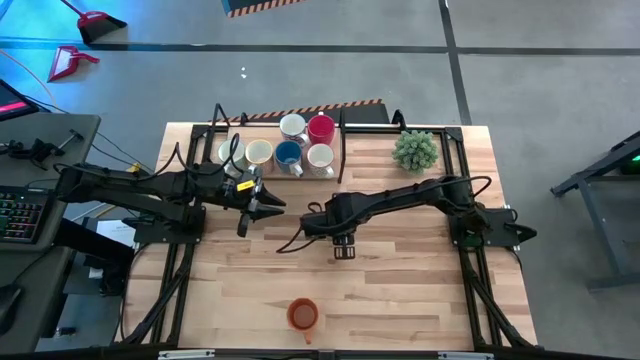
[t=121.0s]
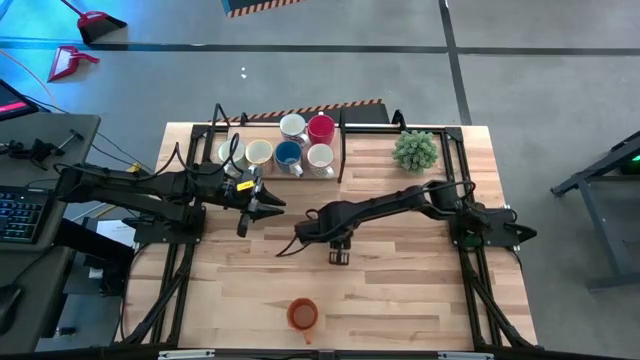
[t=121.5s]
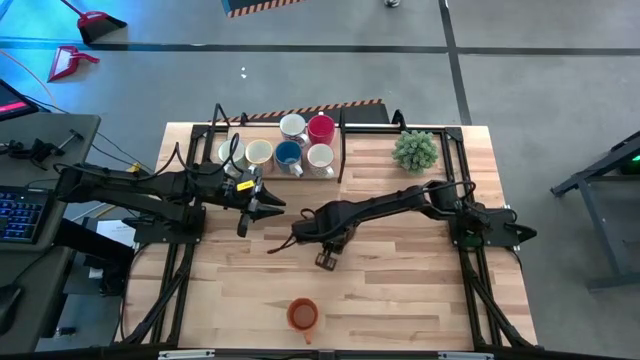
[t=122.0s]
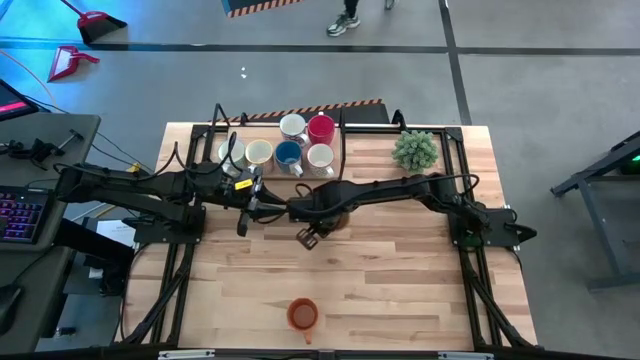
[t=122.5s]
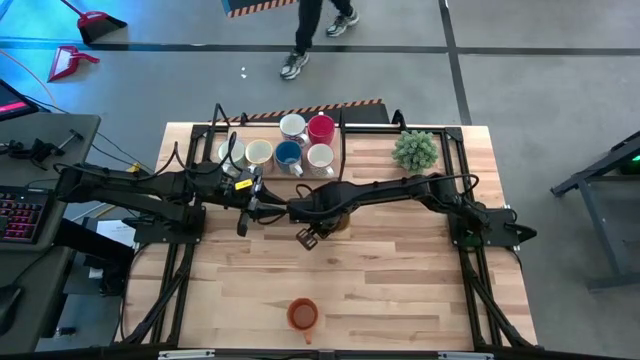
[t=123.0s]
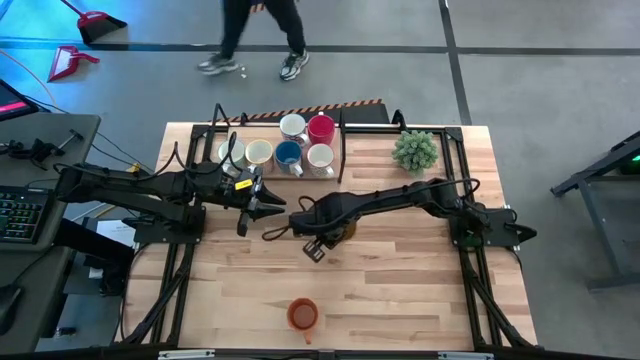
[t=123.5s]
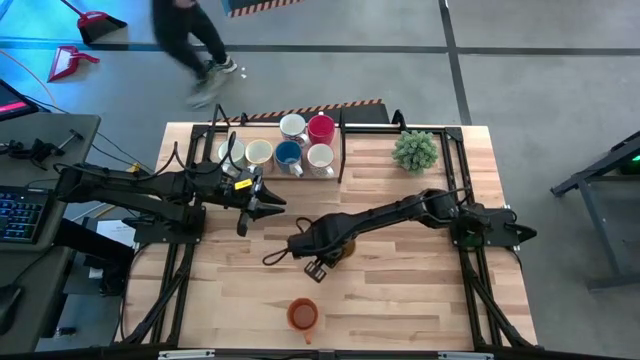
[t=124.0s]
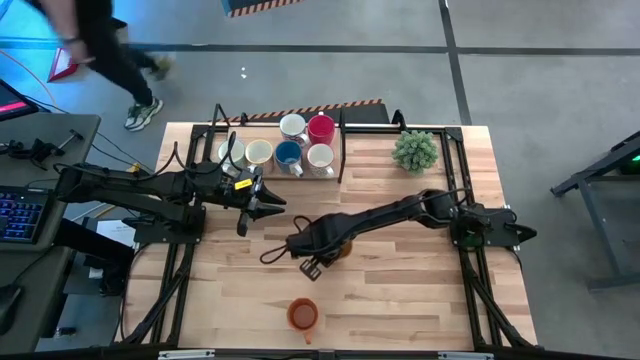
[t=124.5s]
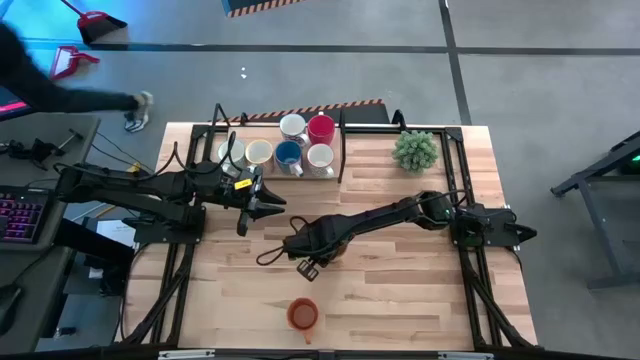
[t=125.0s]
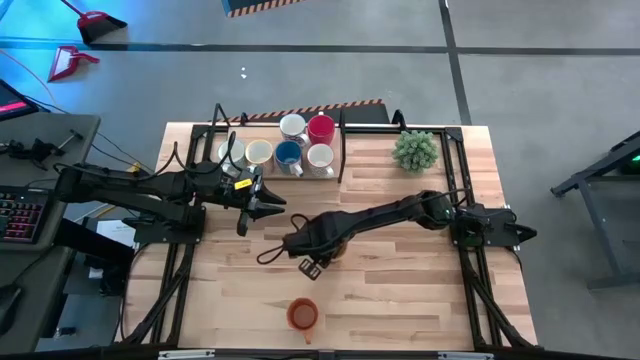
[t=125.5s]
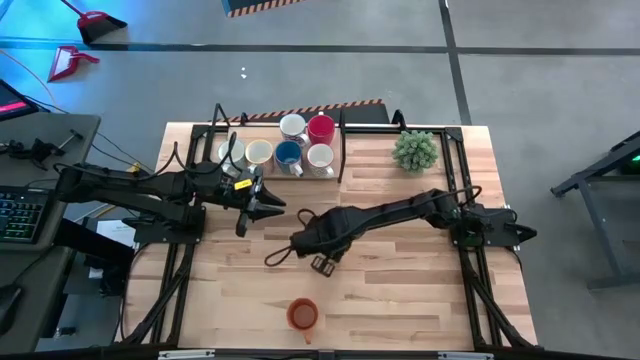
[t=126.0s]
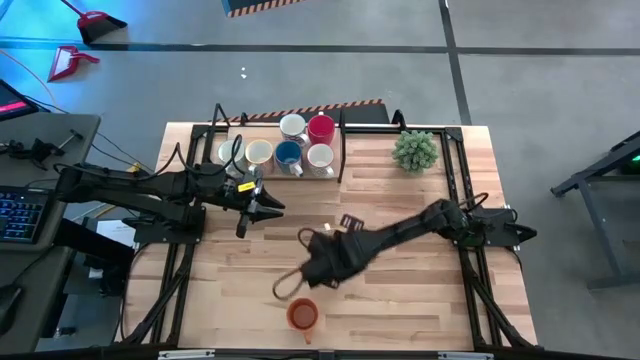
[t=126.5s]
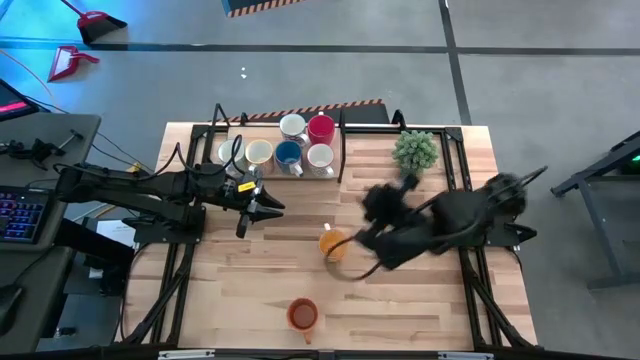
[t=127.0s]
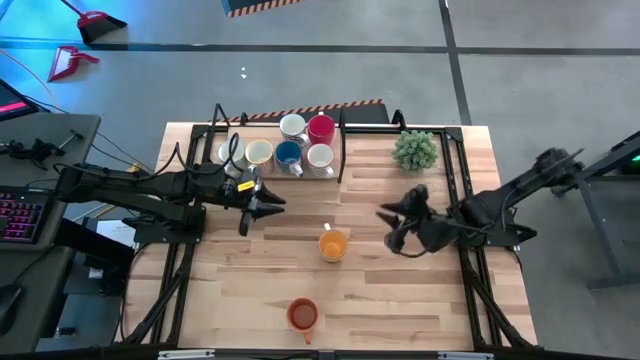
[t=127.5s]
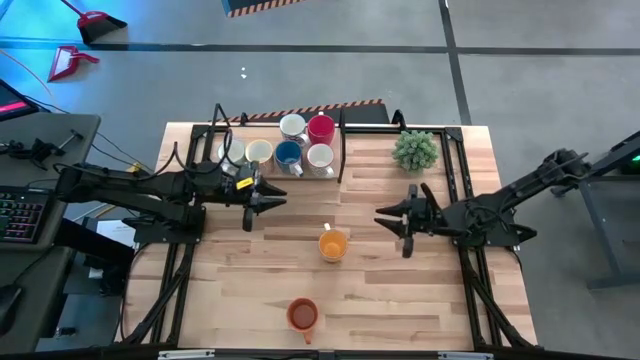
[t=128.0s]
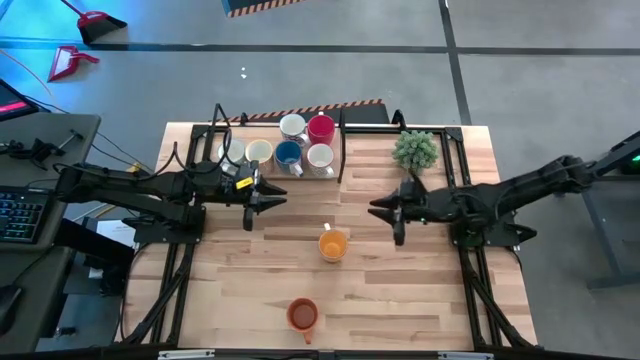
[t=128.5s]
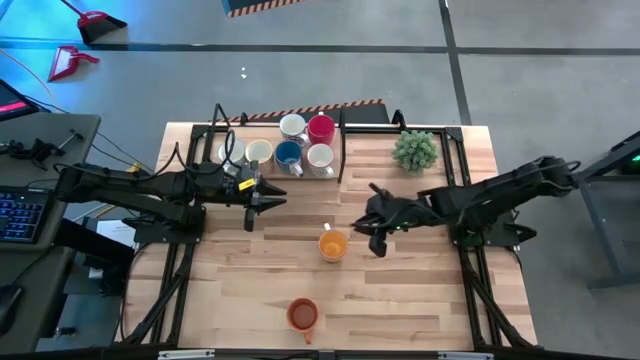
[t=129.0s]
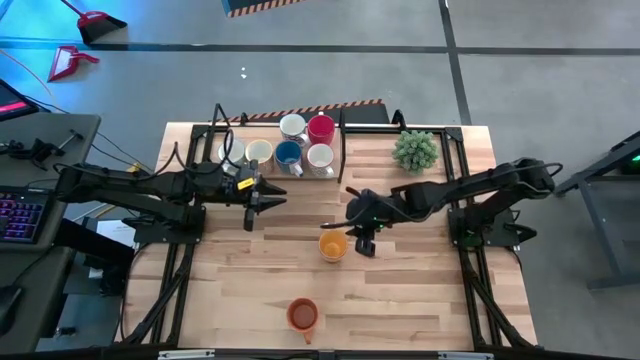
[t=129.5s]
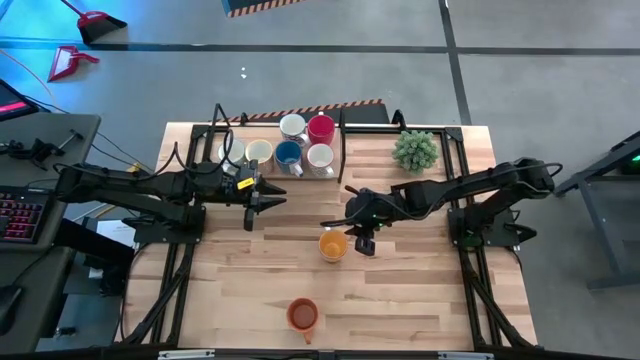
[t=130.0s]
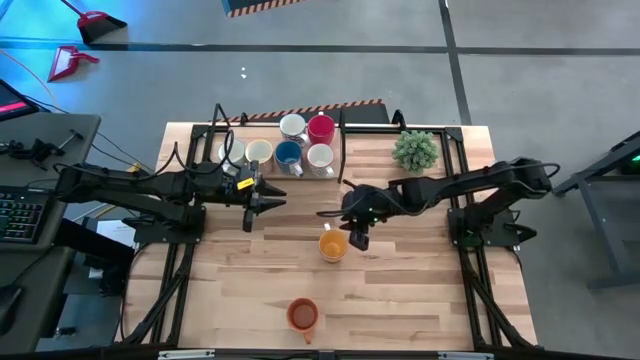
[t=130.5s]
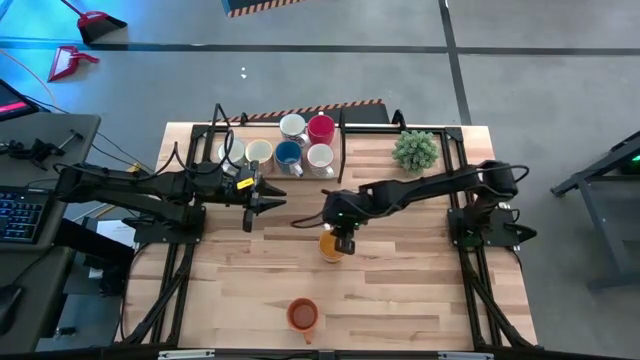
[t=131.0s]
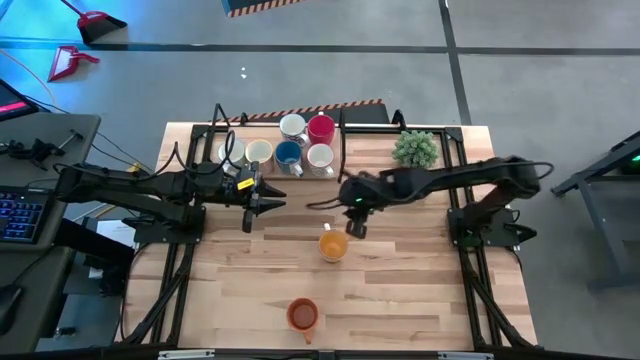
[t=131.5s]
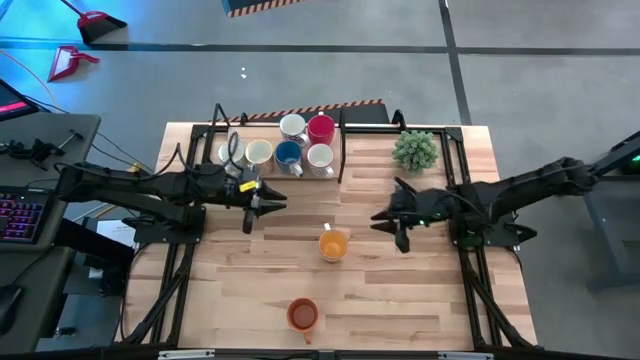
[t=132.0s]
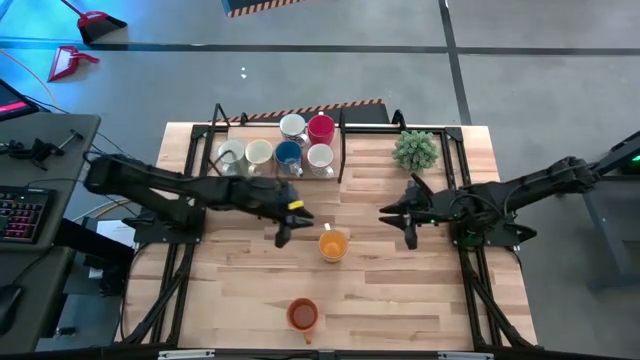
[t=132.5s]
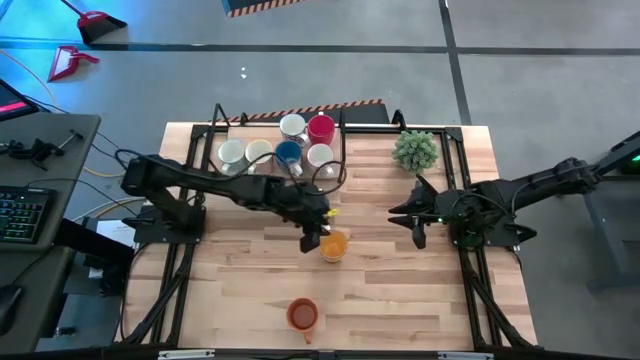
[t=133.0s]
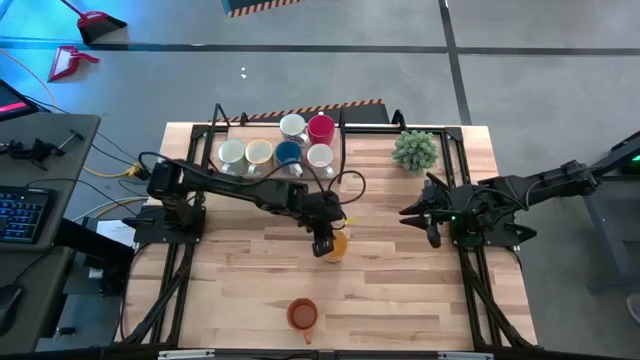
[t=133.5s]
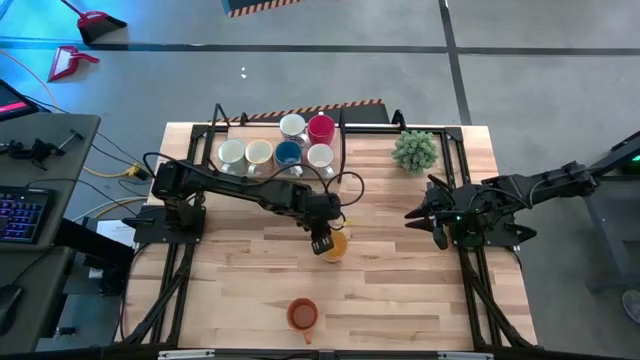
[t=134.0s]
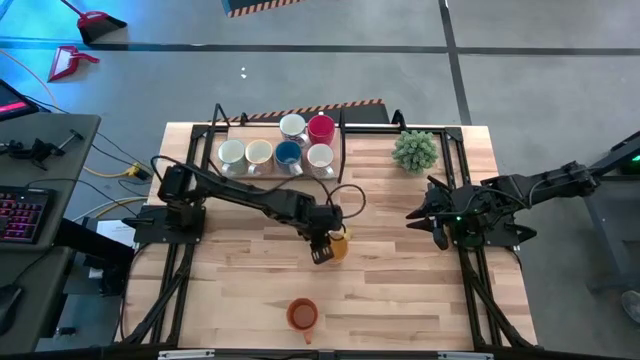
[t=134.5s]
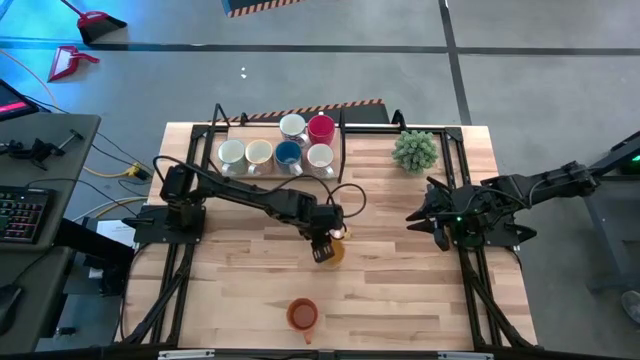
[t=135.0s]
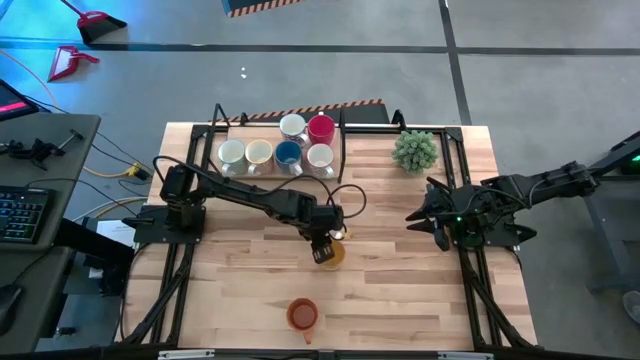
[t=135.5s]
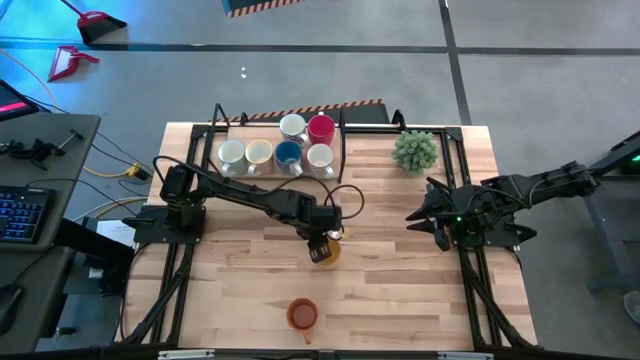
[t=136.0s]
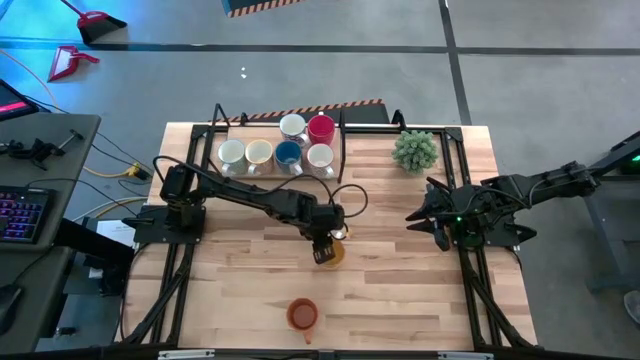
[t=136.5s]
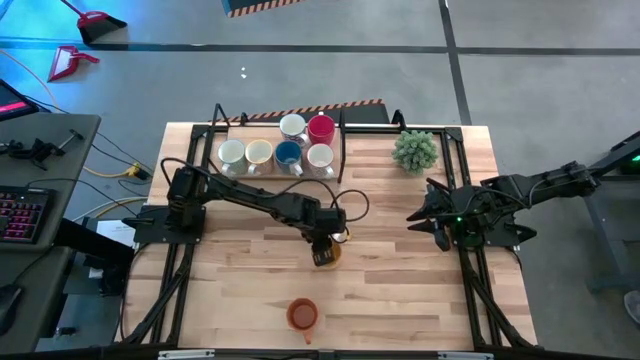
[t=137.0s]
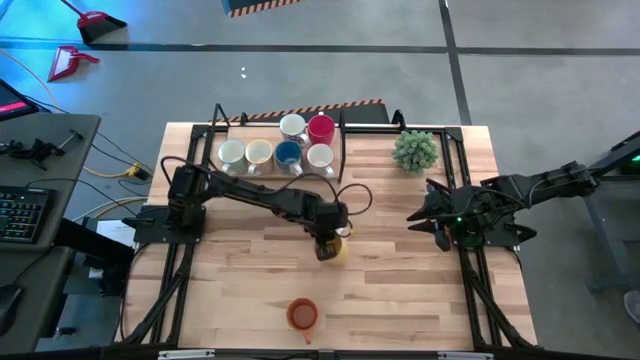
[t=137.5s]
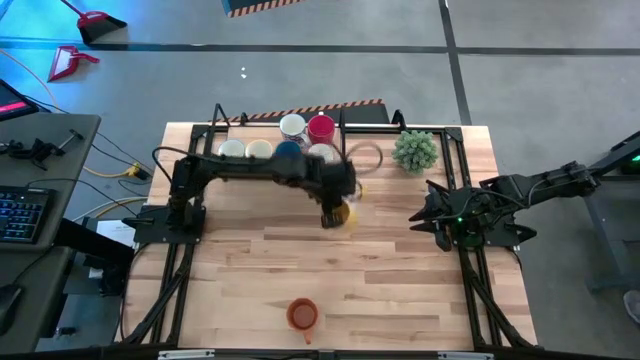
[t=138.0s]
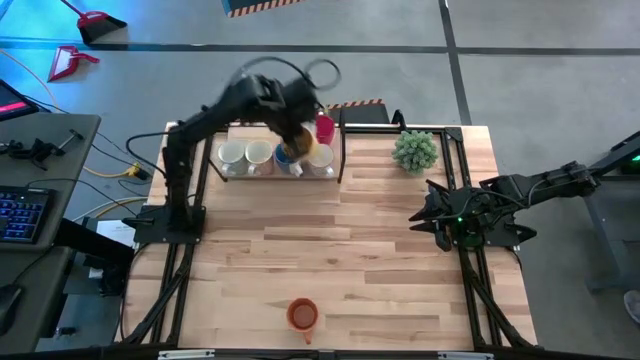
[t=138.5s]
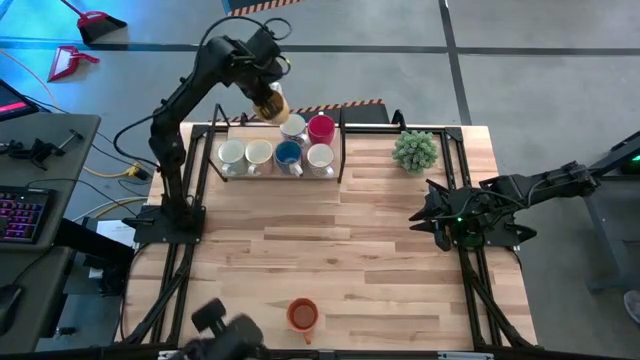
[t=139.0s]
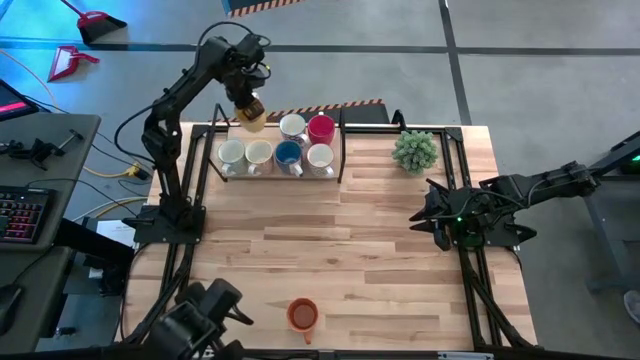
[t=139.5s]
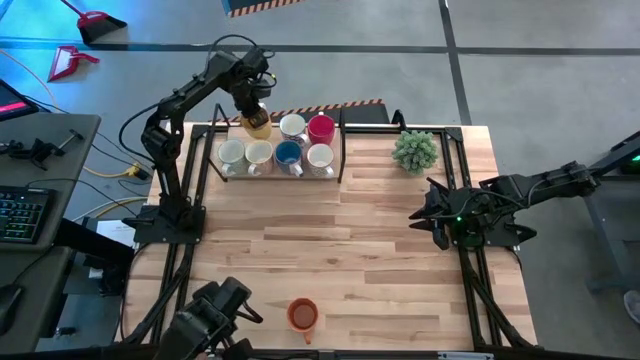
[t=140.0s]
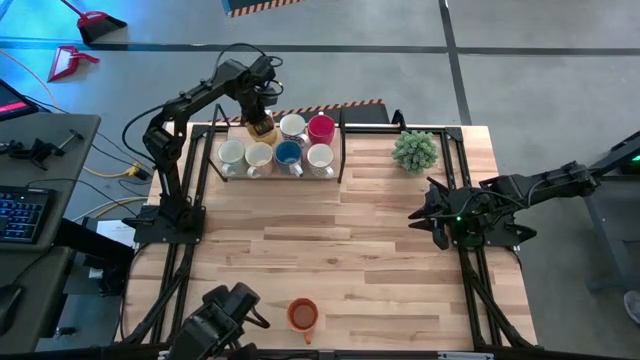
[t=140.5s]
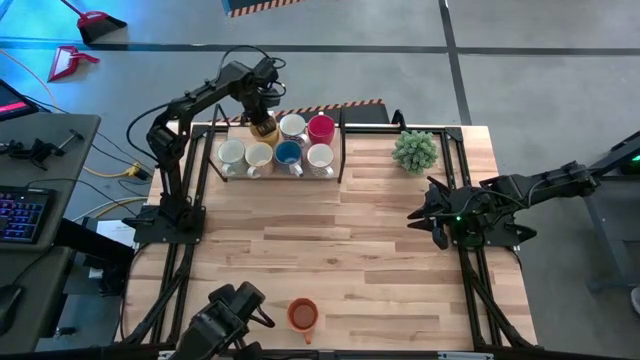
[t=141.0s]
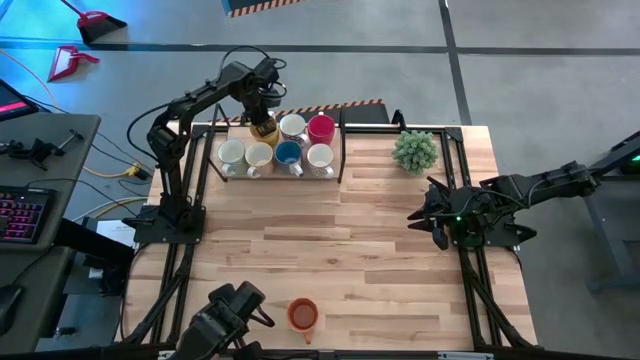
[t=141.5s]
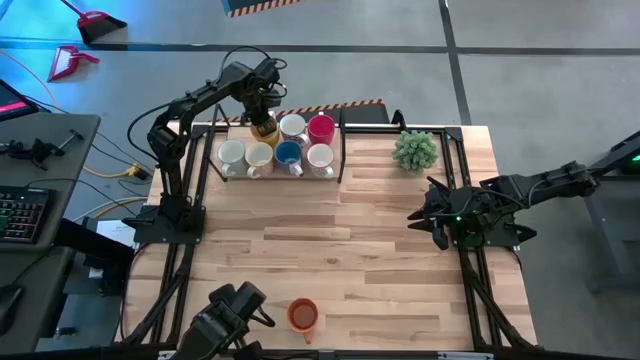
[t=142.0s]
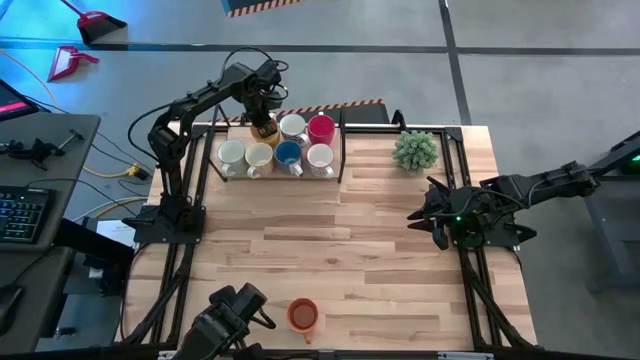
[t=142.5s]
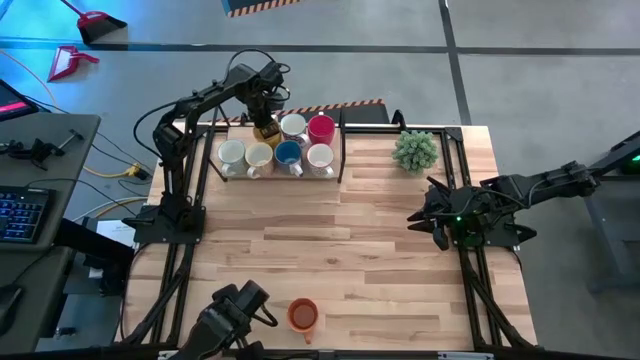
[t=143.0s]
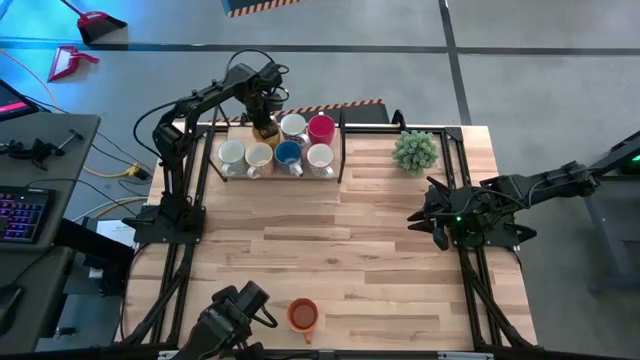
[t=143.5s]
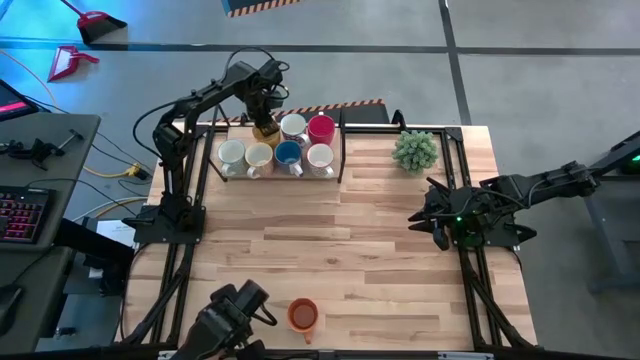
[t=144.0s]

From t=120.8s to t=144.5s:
Task: Place coffee mugs
Put the yellow mug on the shelf
